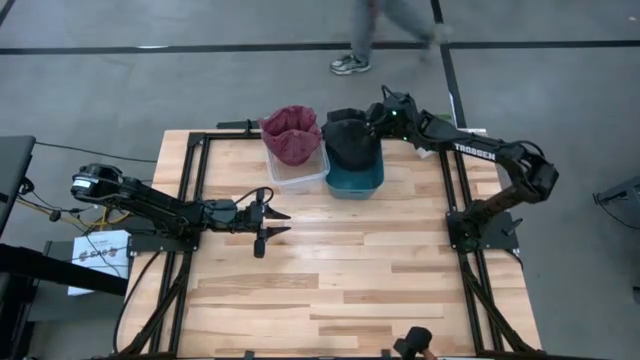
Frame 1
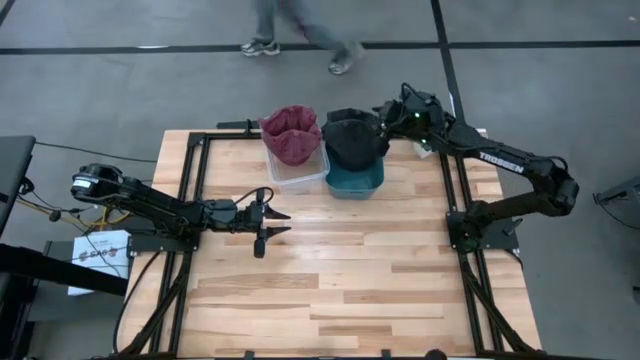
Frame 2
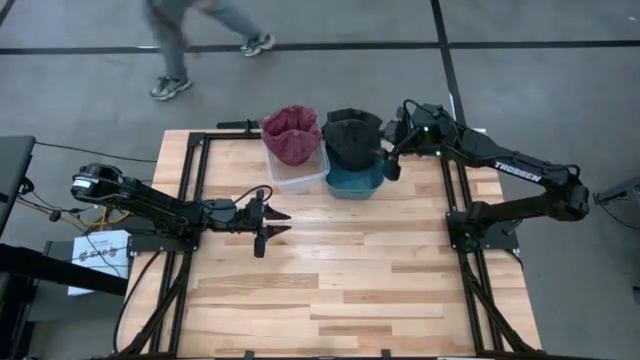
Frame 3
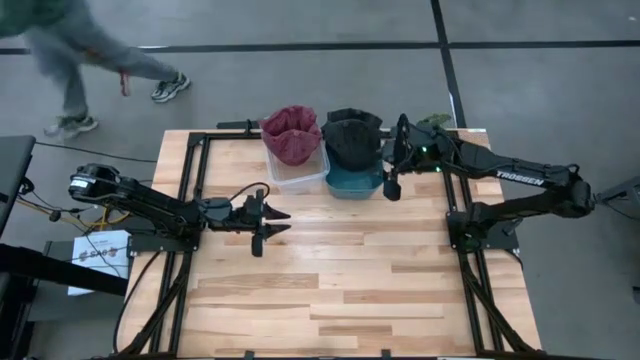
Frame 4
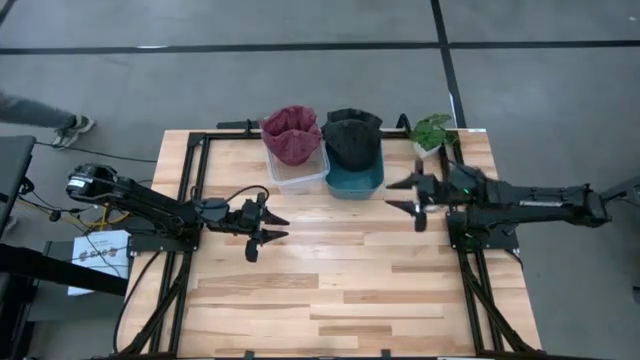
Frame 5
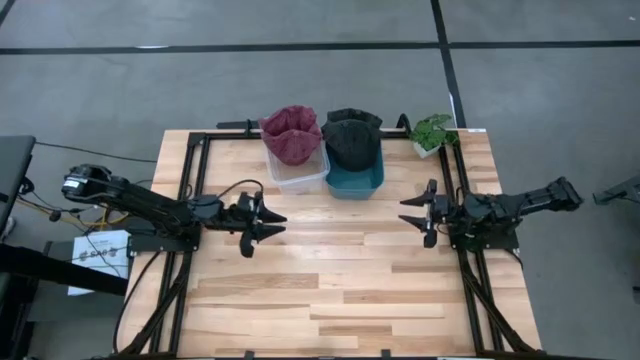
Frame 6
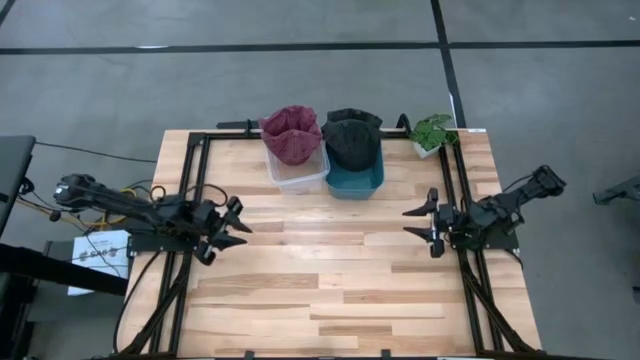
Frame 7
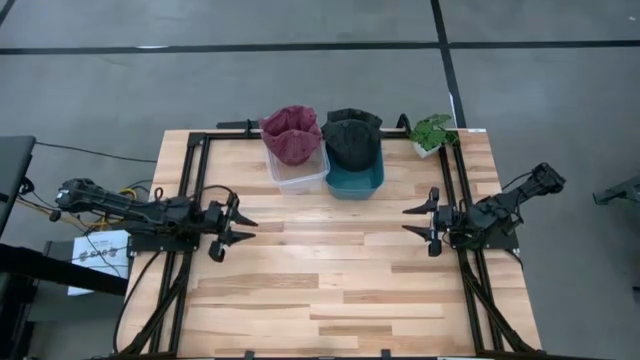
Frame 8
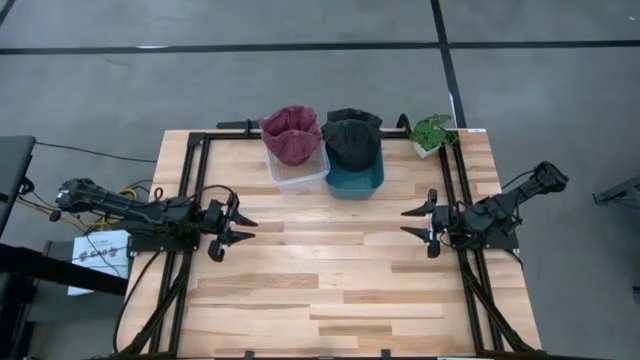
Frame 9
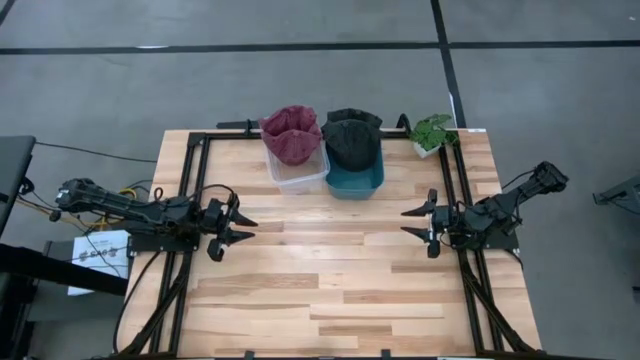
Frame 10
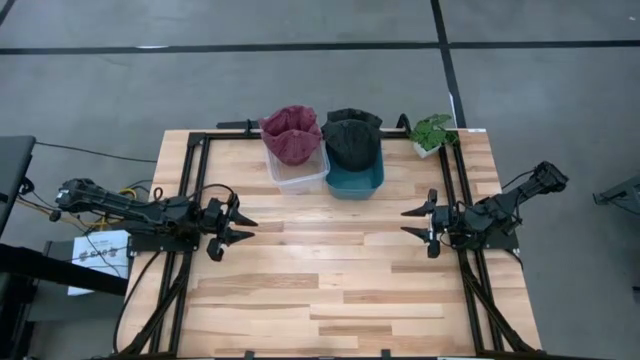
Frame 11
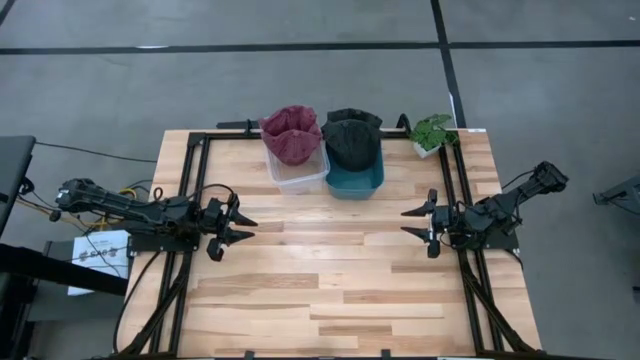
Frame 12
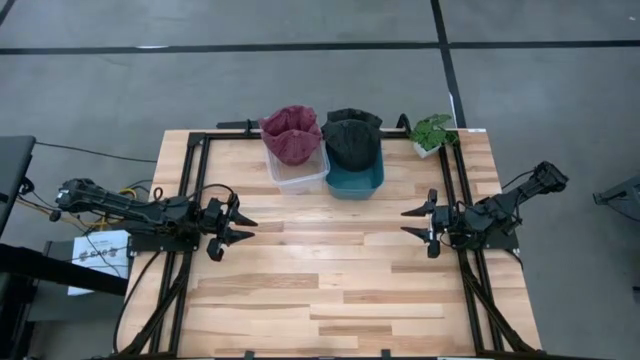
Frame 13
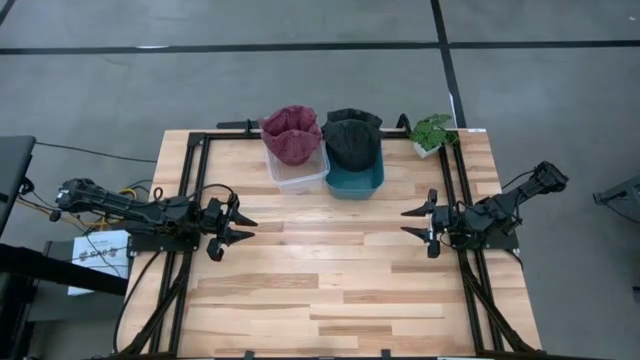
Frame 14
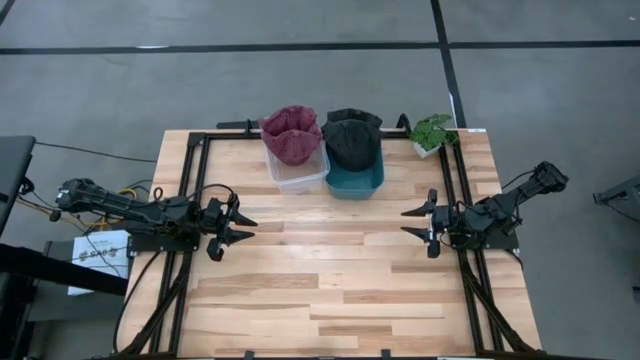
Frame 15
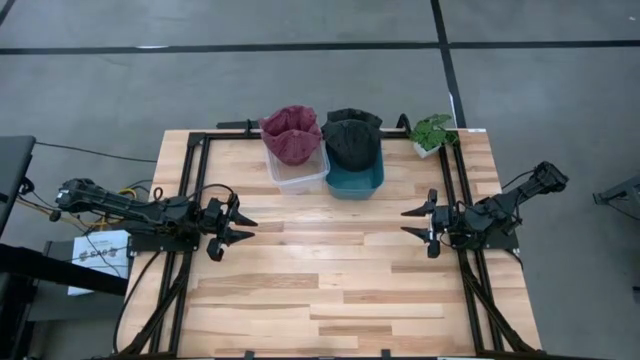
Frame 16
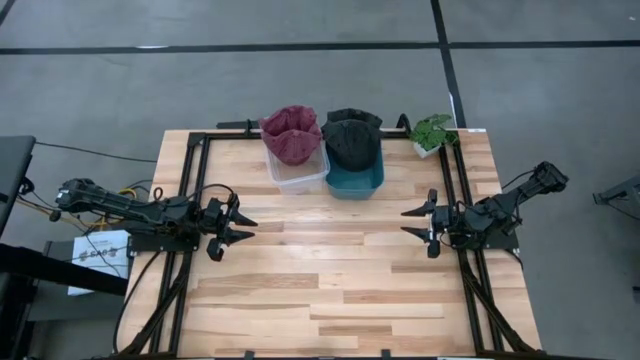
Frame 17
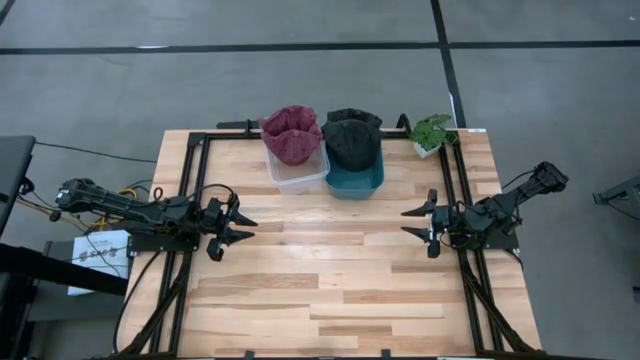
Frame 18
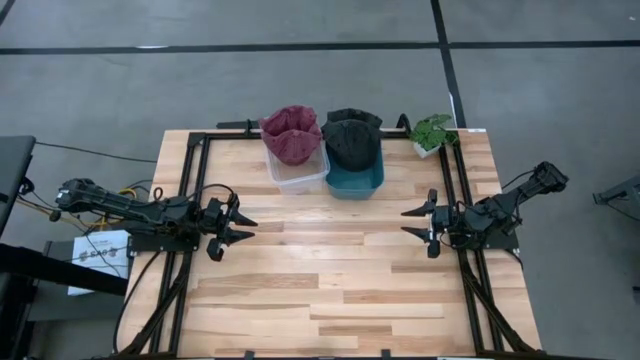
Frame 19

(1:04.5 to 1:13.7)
Task: Pick & Place hat
Return to Home Position

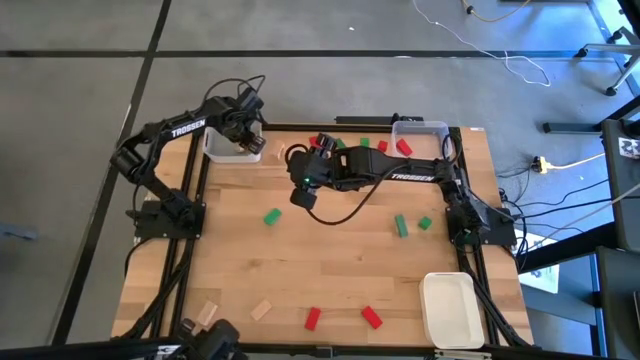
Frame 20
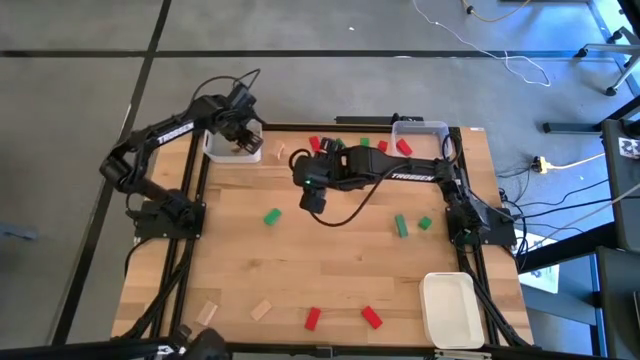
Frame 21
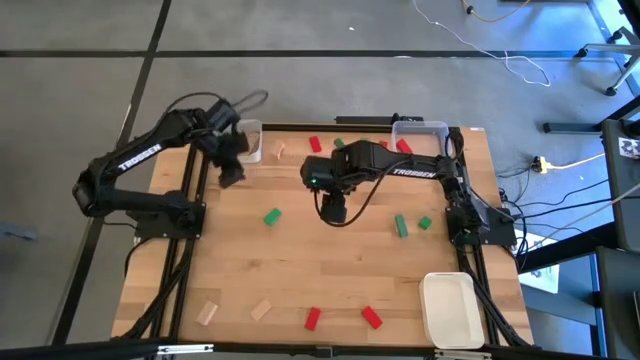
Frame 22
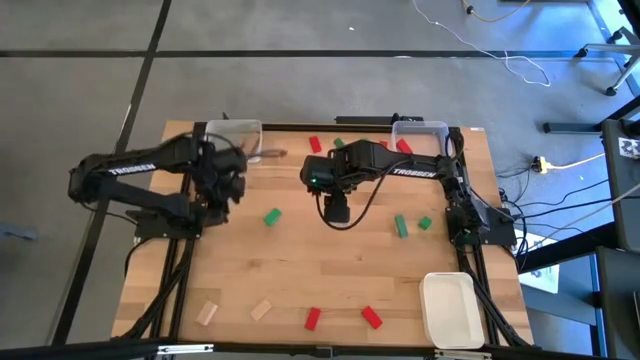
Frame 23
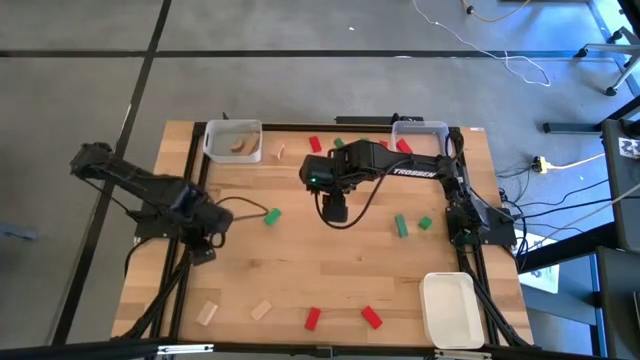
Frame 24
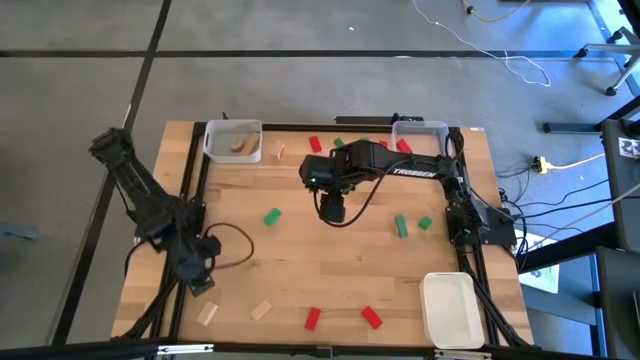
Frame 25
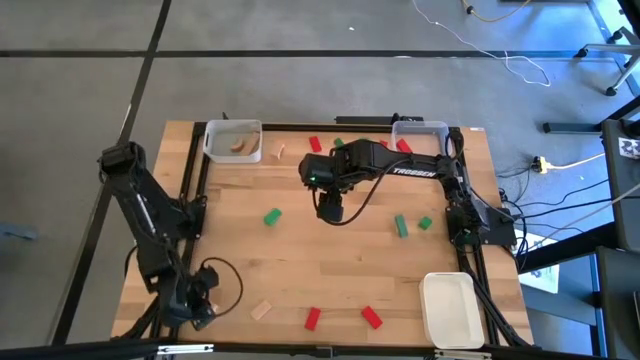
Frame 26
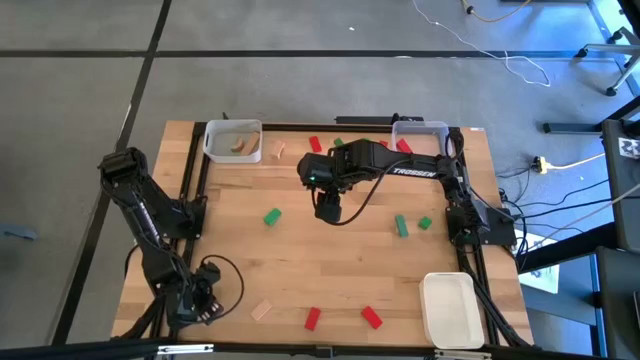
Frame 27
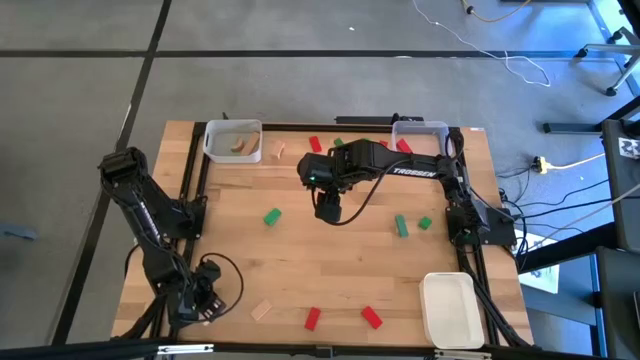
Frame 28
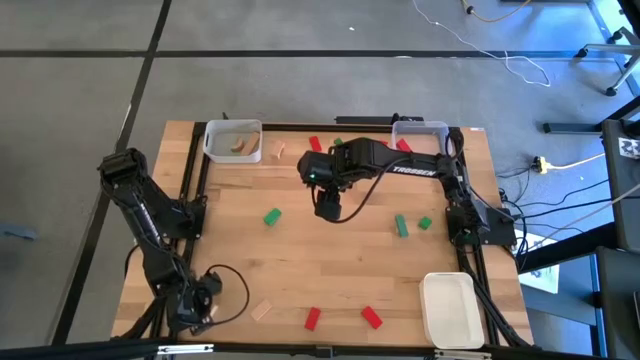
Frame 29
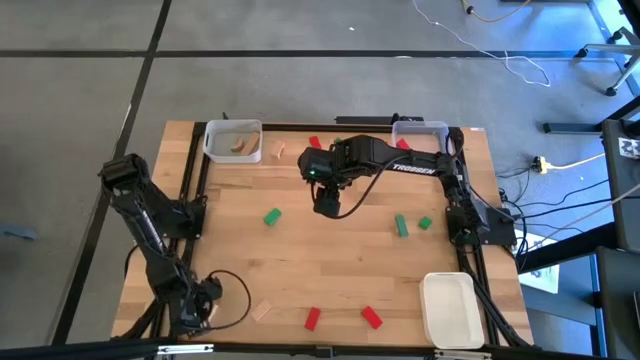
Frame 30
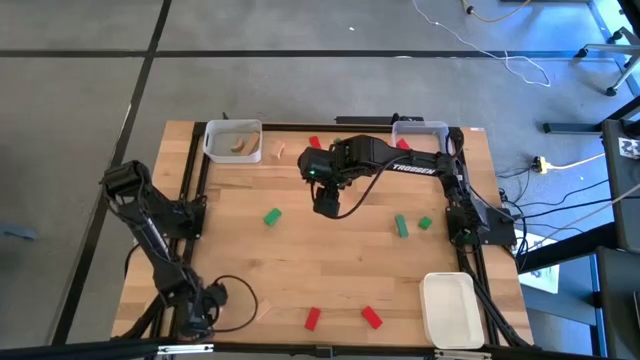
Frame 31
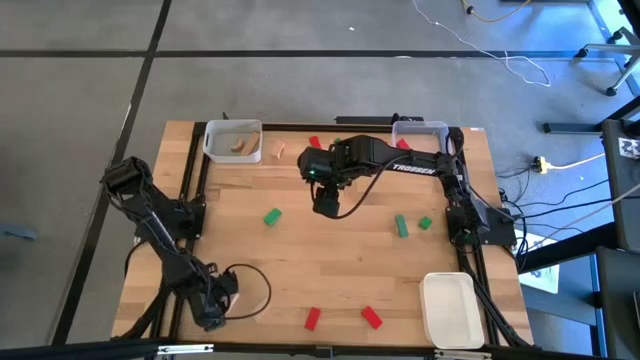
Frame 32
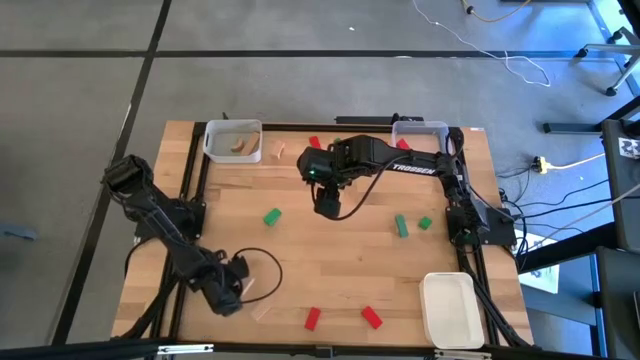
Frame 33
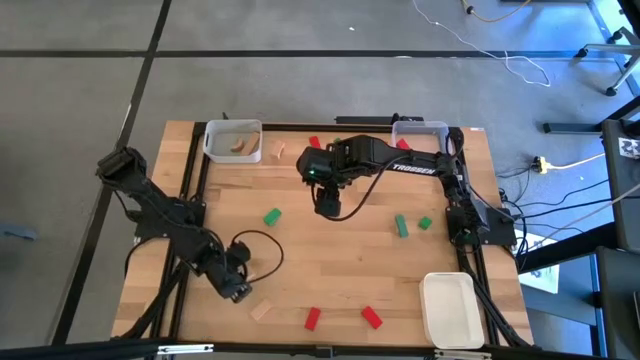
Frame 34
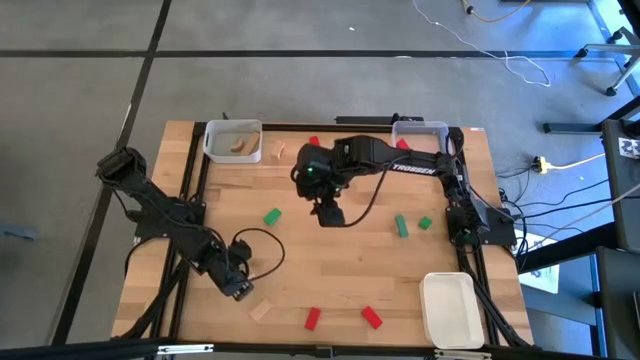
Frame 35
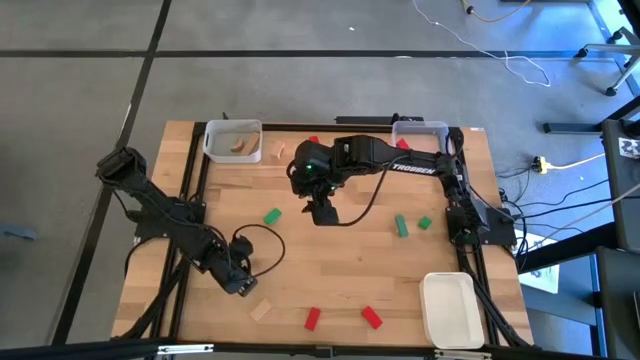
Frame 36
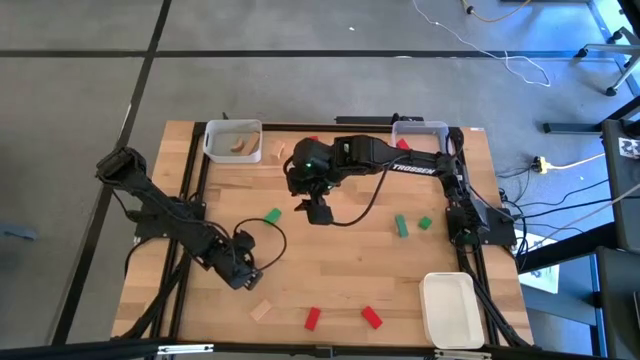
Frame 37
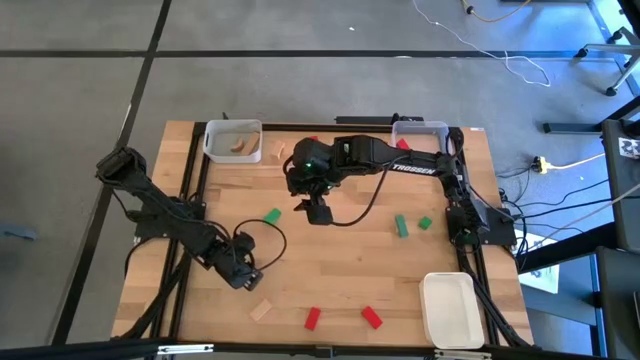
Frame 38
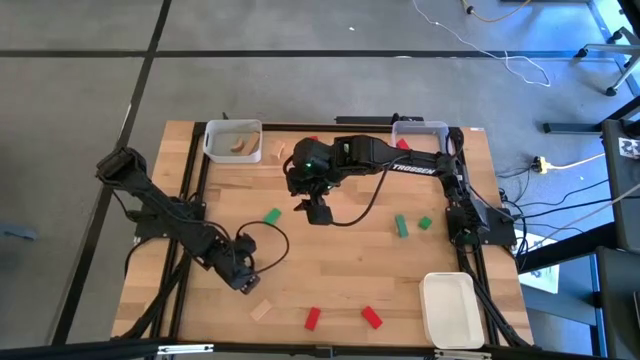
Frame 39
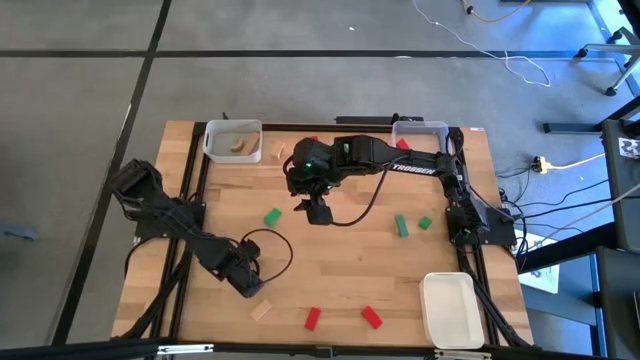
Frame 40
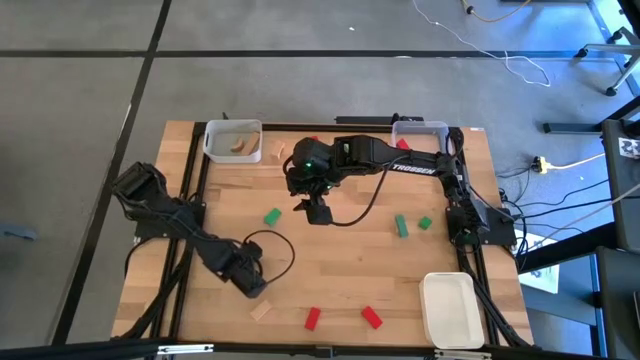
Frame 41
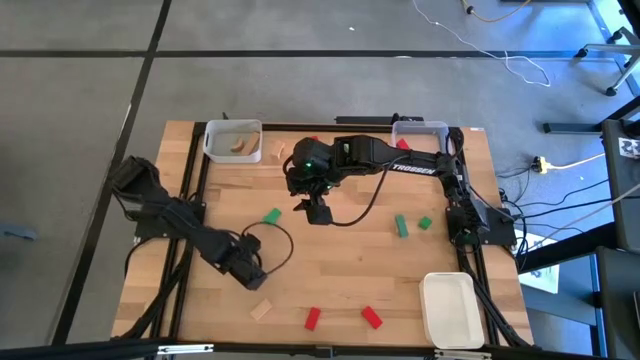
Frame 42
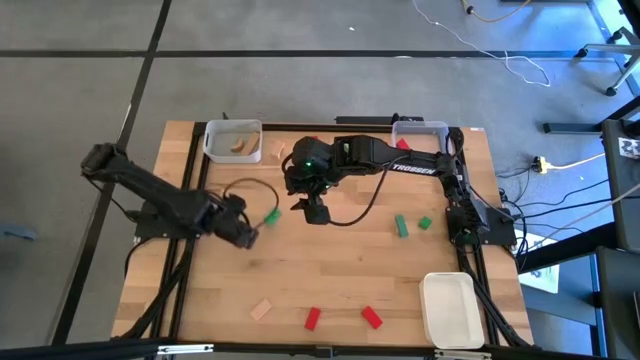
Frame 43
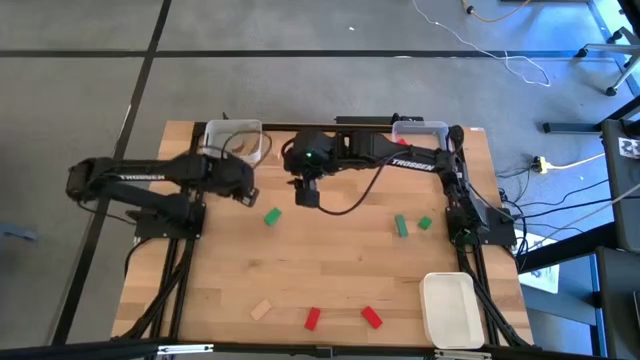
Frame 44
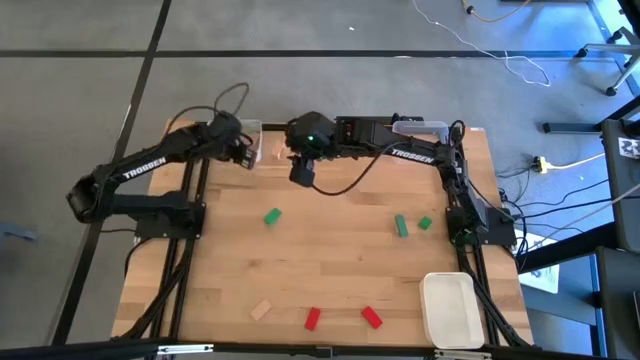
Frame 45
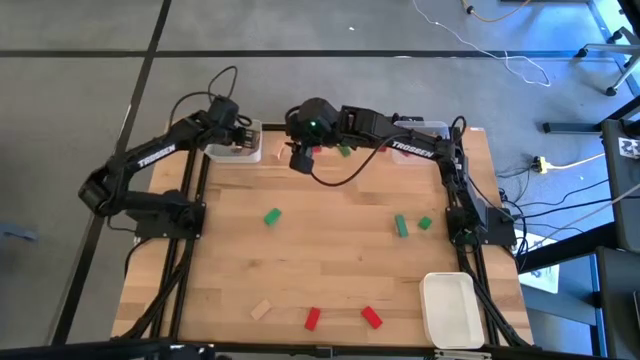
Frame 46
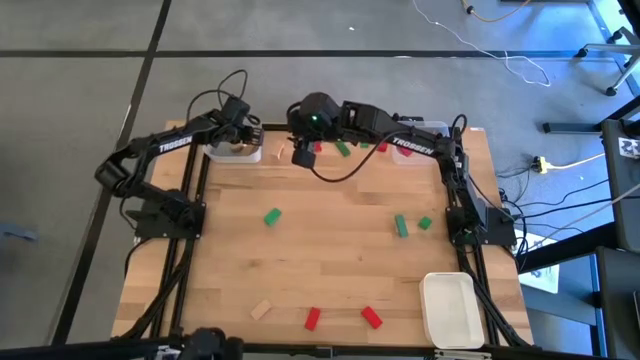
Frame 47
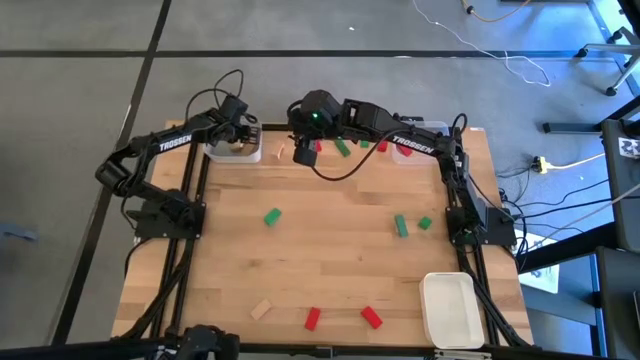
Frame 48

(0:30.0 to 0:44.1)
Task: Sort & place blocks by color
Put the light brown block into the gray bin
